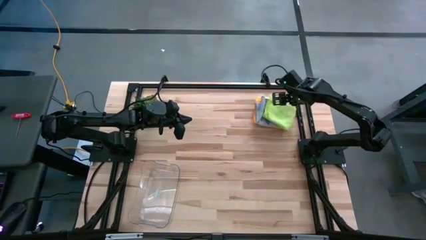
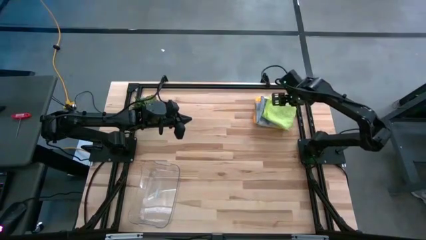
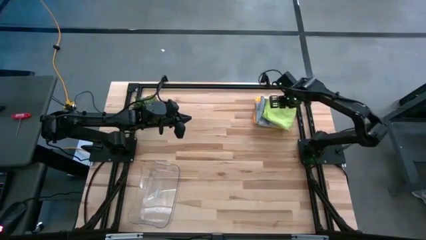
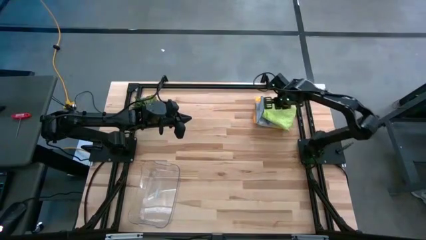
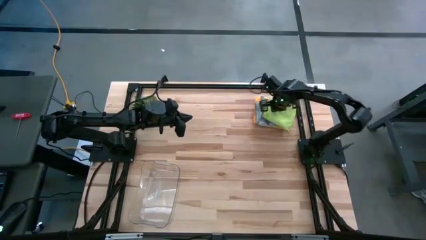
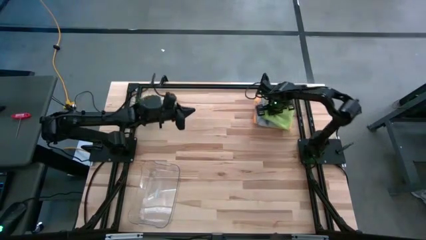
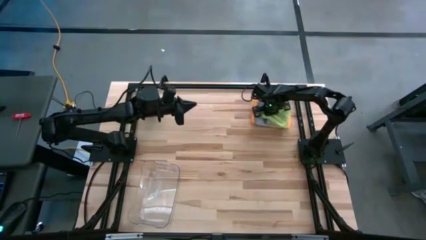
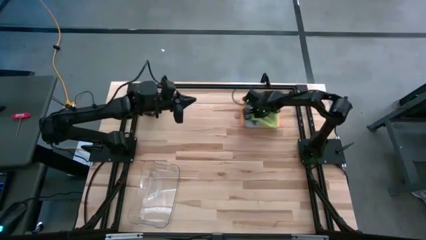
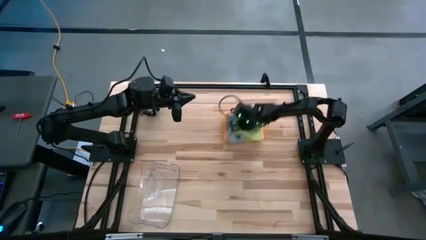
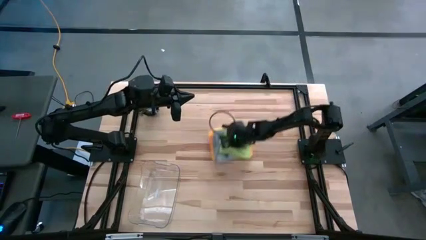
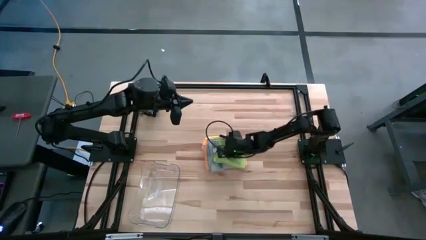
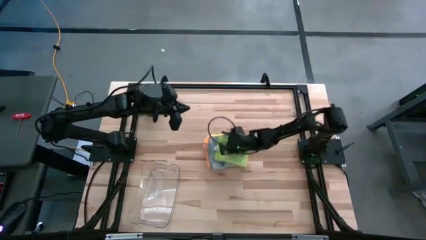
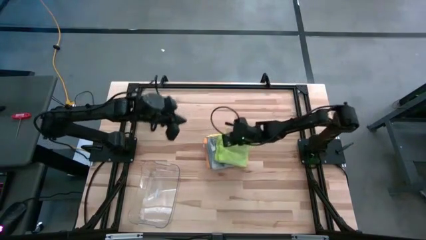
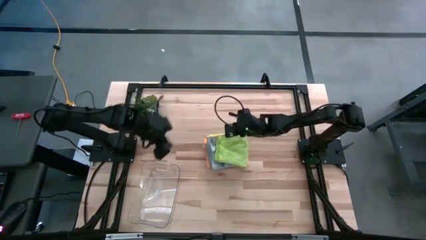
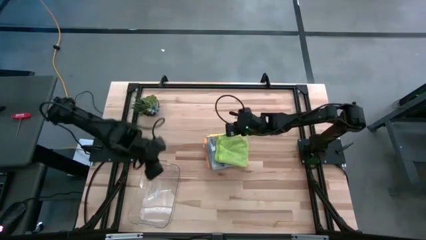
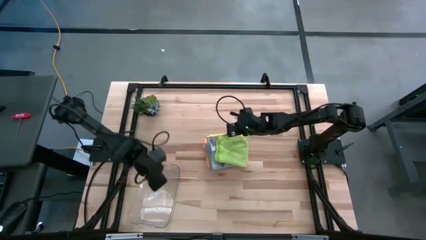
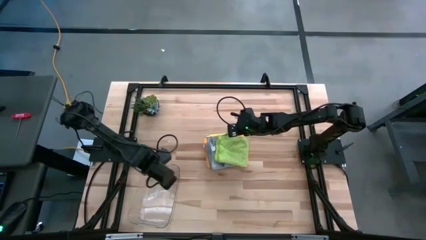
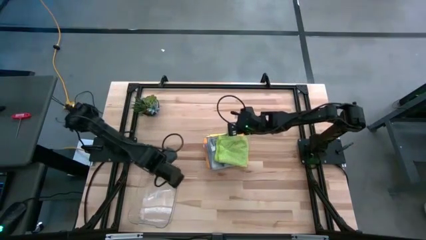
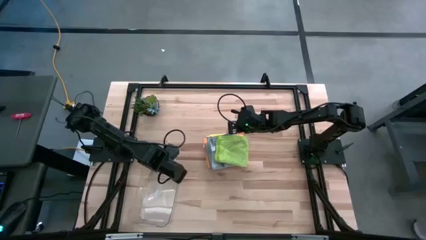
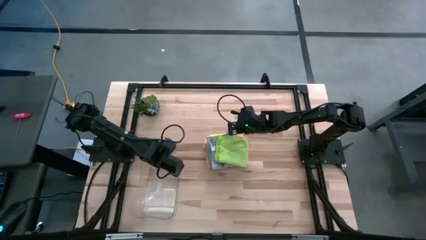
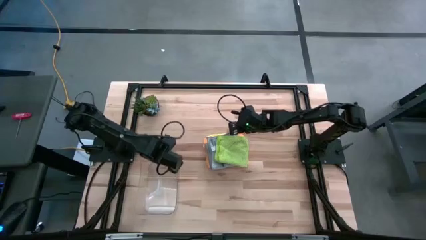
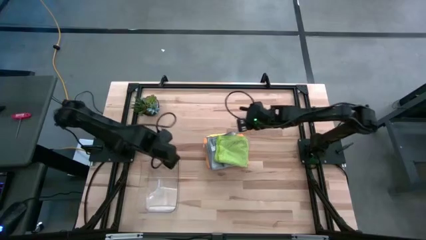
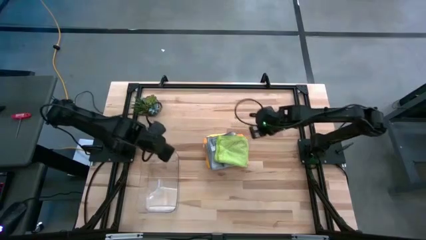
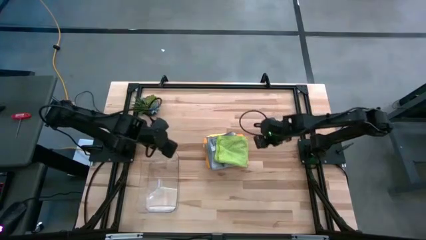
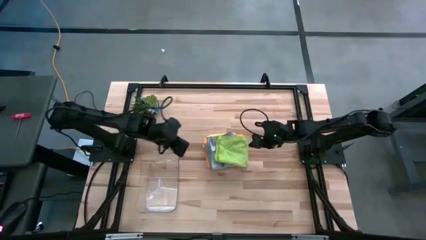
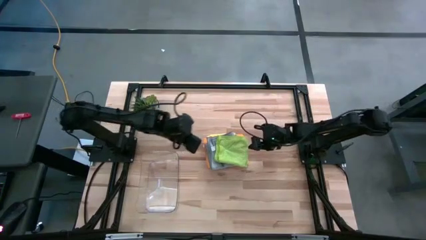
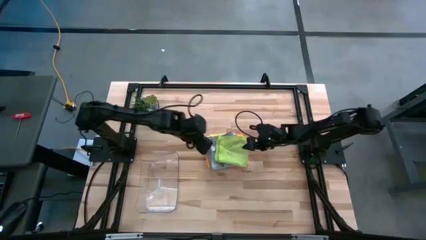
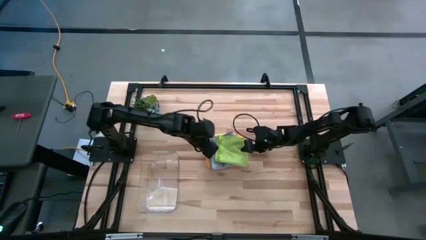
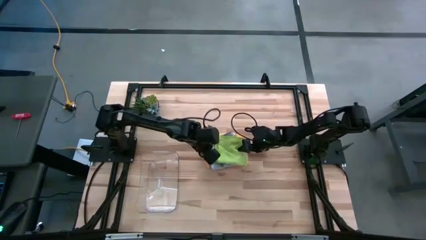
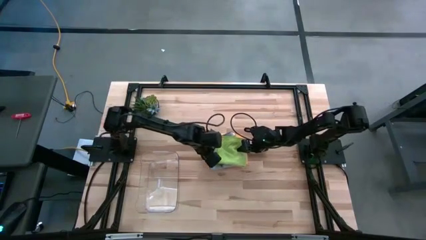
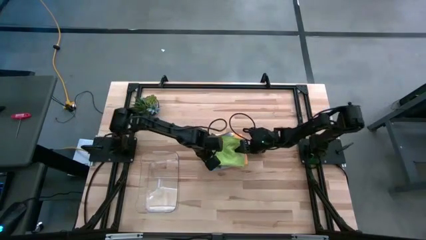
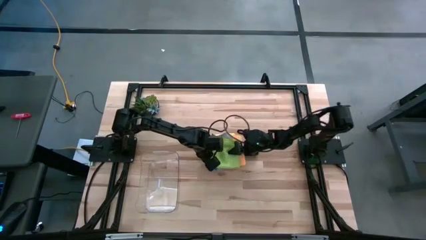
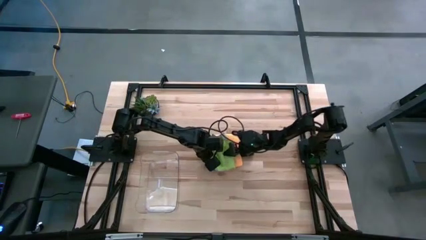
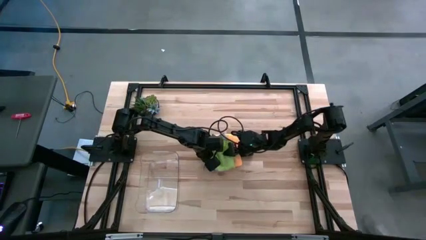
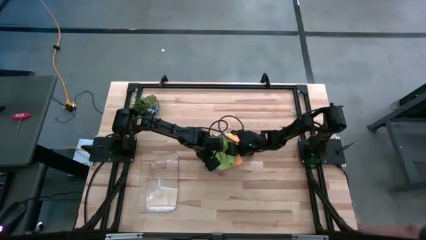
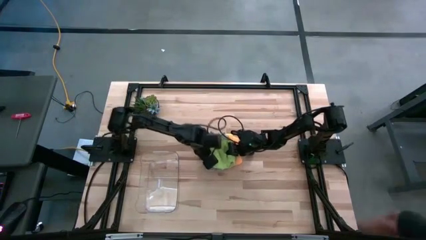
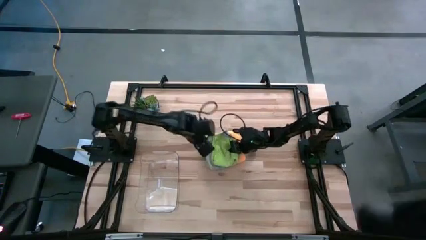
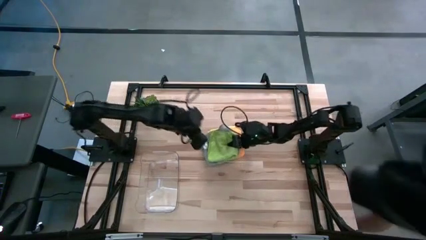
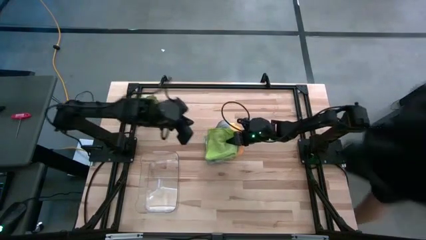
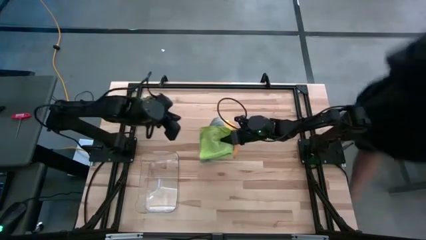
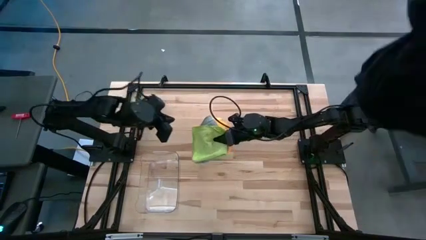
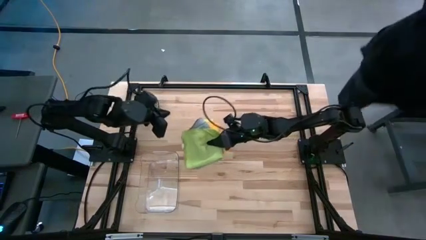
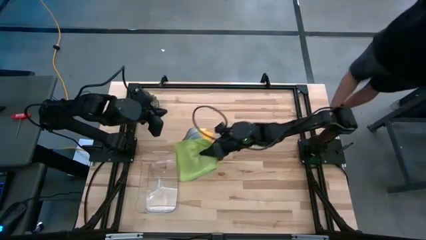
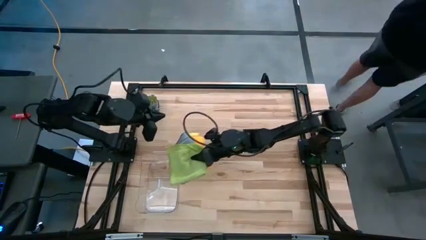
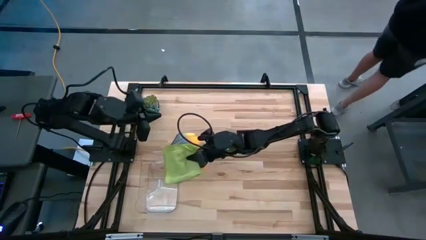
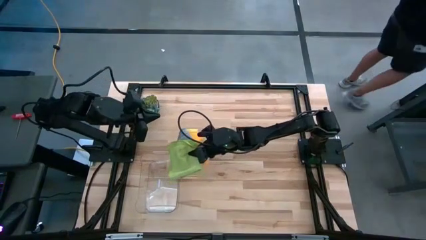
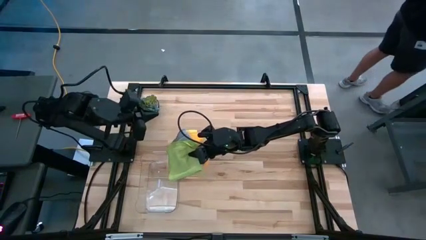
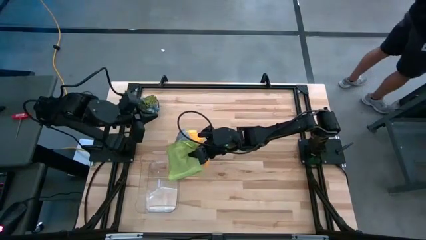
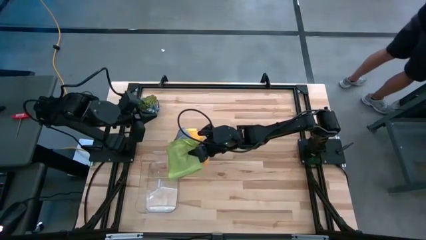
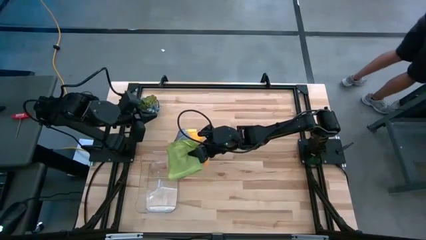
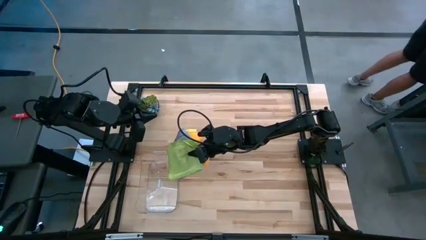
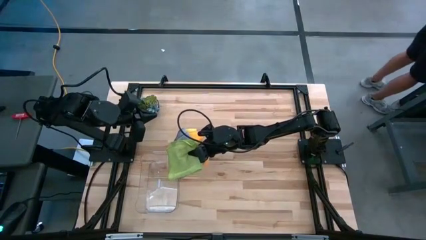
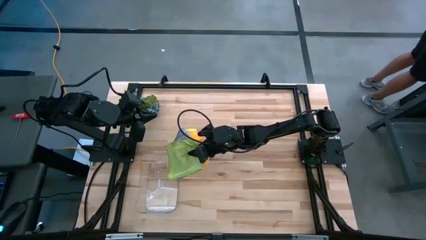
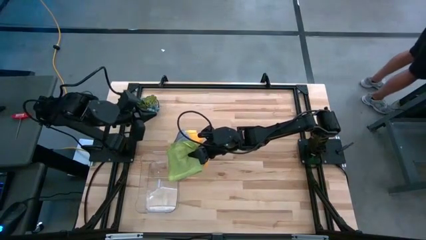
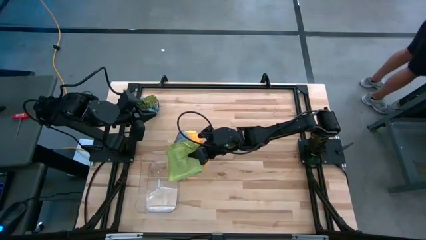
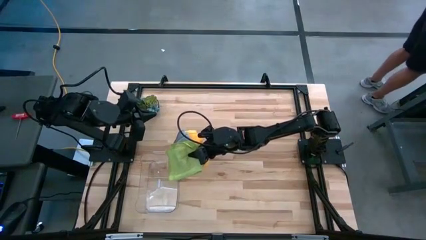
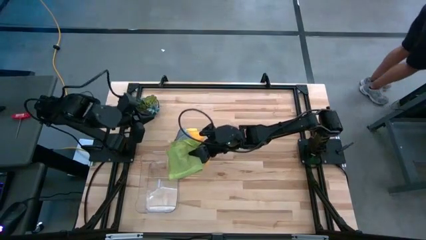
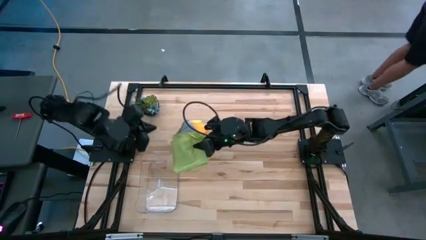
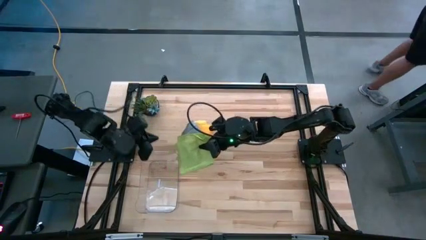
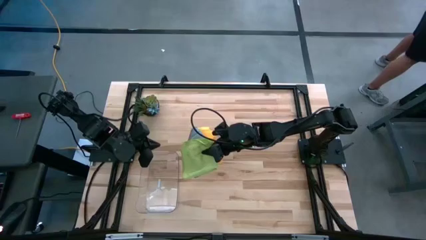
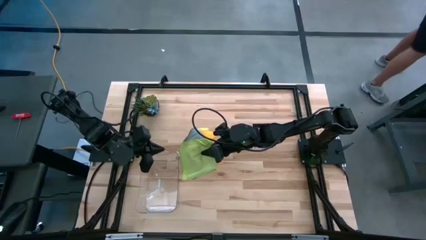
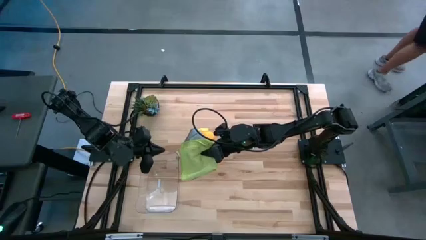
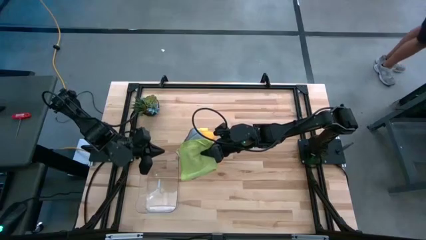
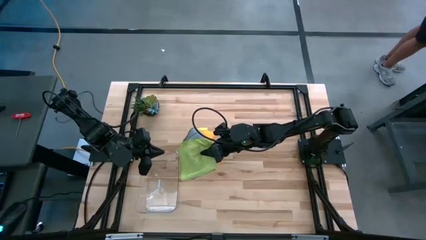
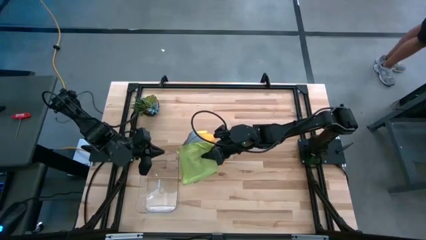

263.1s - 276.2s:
Task: Fold microfiber towels
Put the stacked towels into the transparent bin

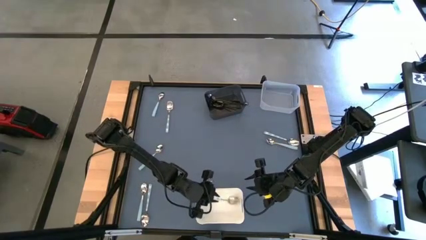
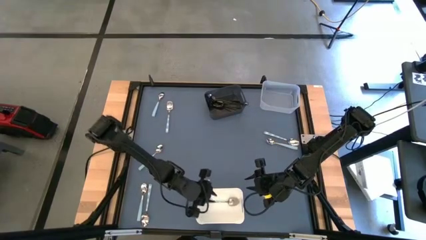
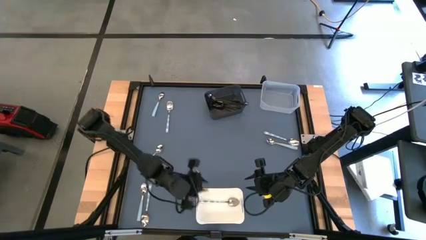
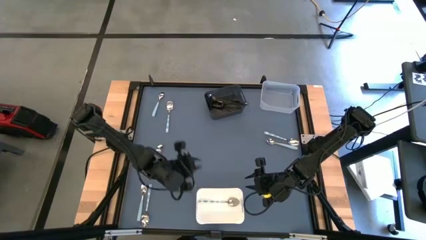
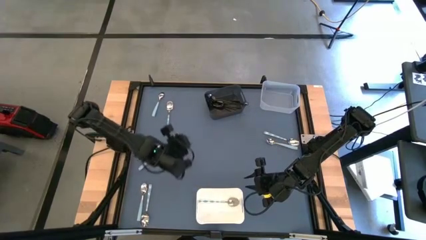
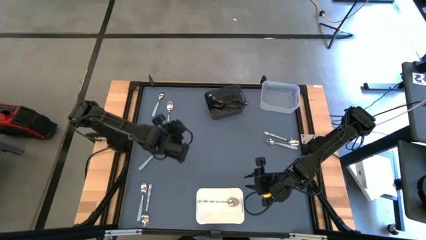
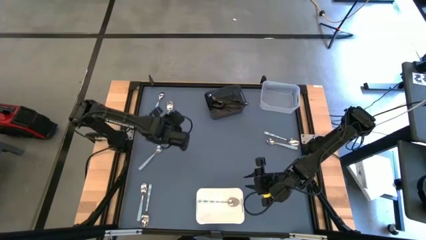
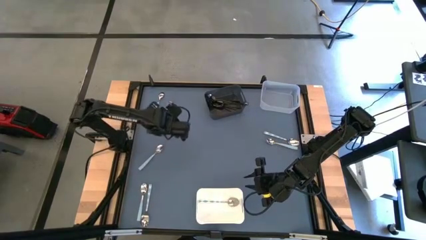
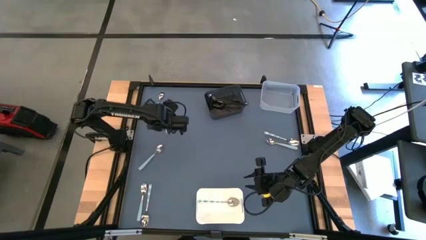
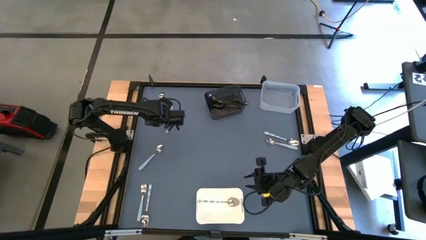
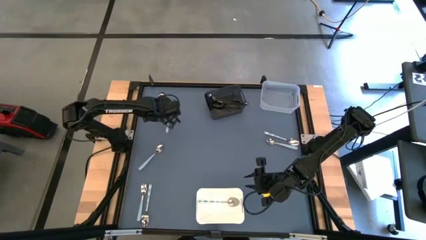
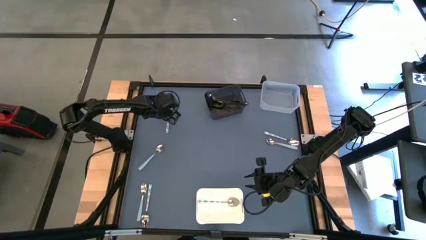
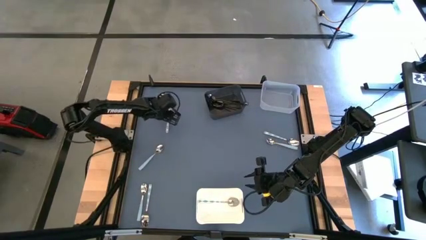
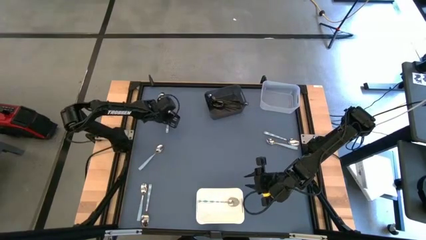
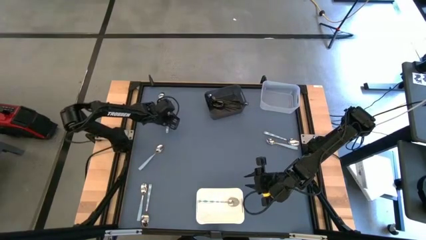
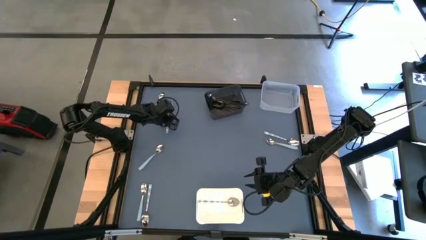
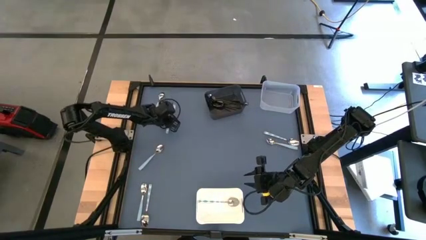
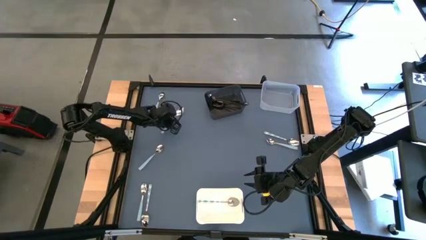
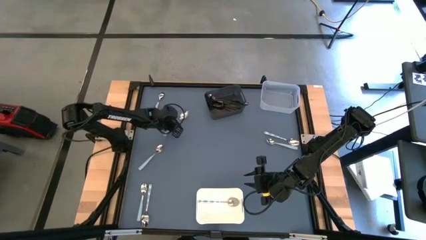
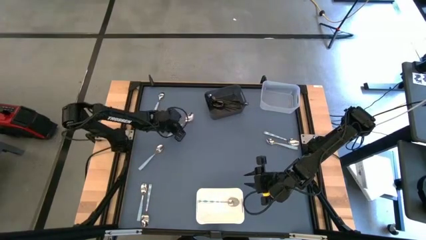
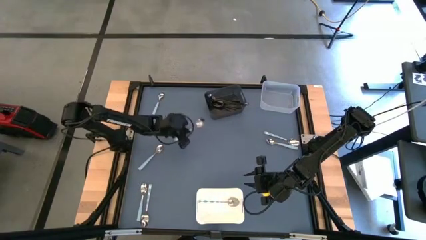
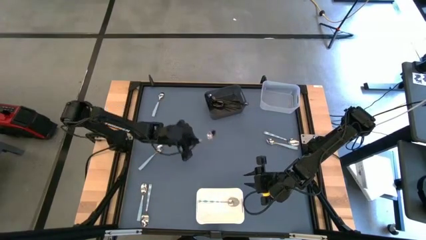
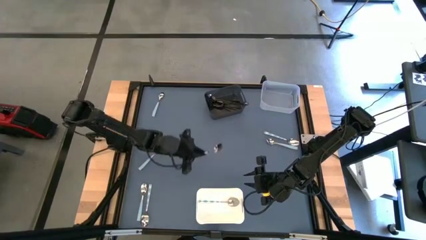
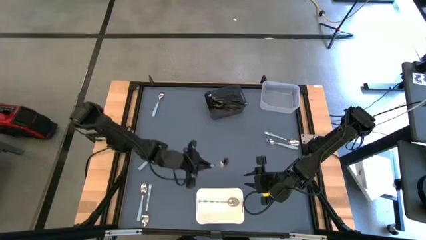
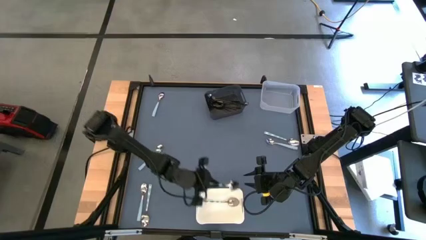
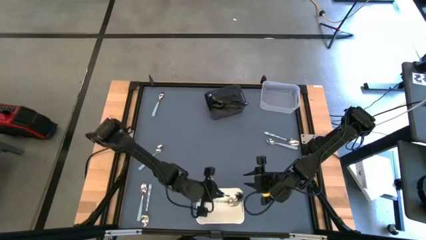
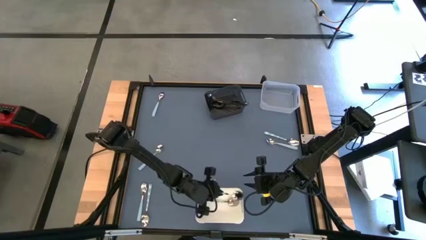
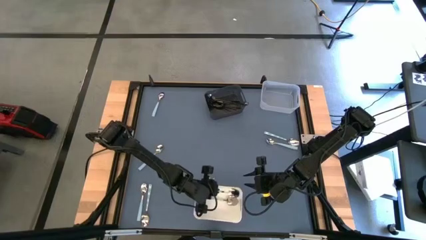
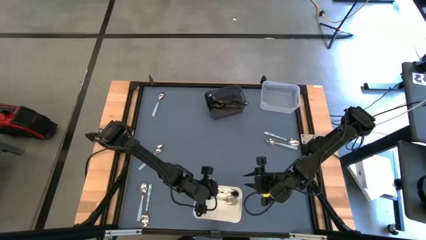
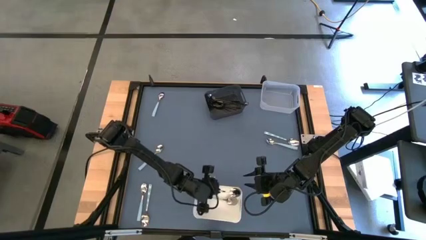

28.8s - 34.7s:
Task: Sort silverware by color (type)
Put the white patterned spoon into the white bin
